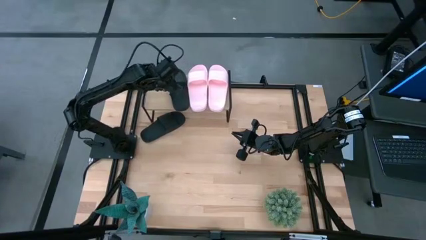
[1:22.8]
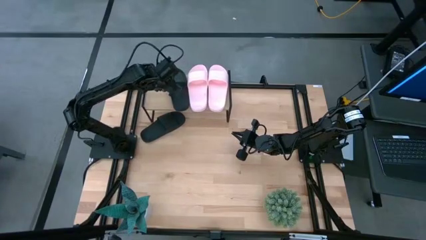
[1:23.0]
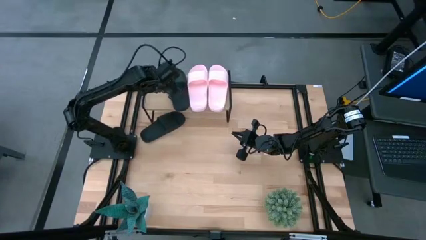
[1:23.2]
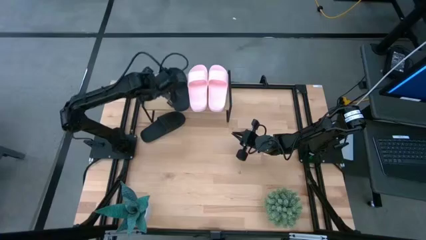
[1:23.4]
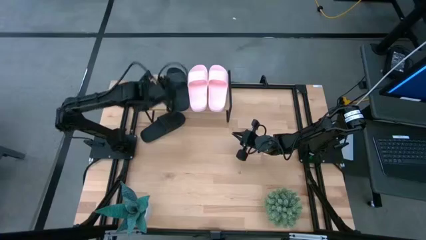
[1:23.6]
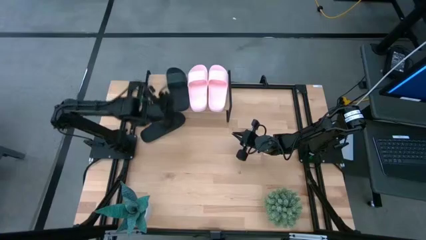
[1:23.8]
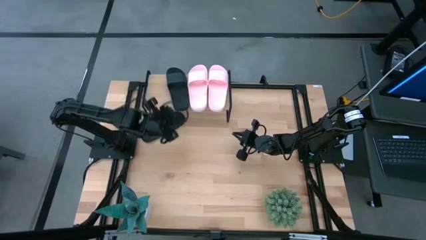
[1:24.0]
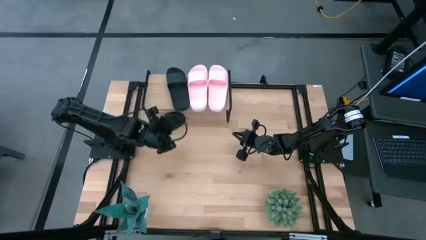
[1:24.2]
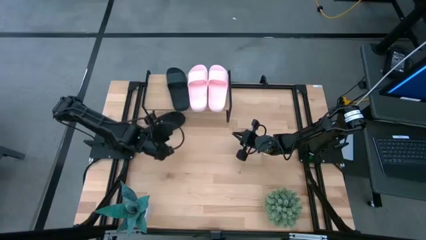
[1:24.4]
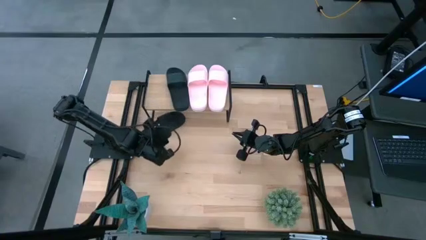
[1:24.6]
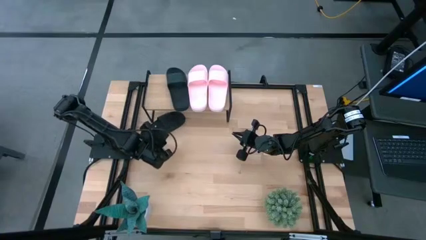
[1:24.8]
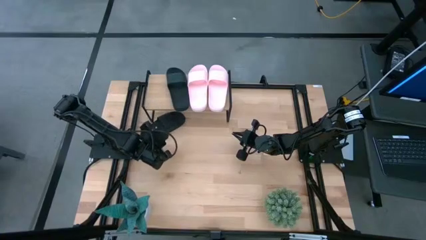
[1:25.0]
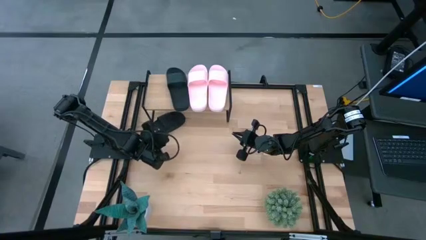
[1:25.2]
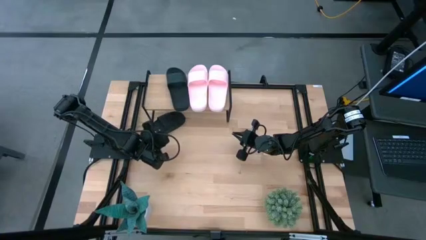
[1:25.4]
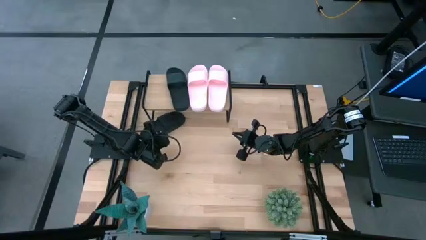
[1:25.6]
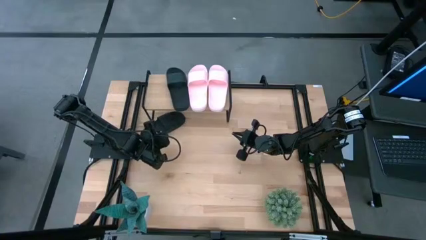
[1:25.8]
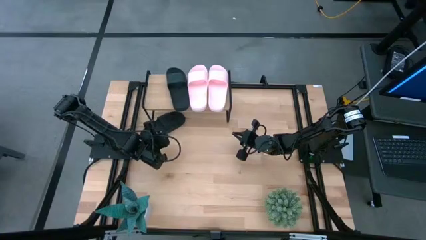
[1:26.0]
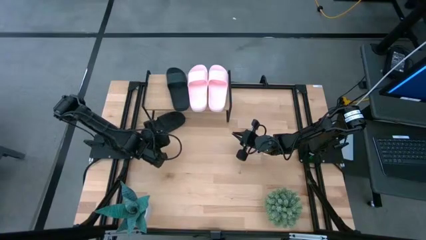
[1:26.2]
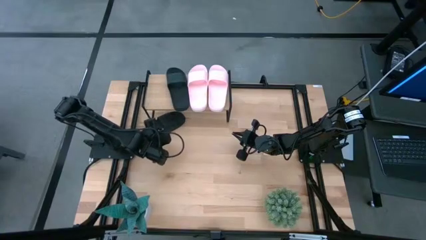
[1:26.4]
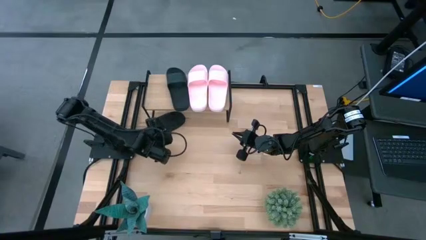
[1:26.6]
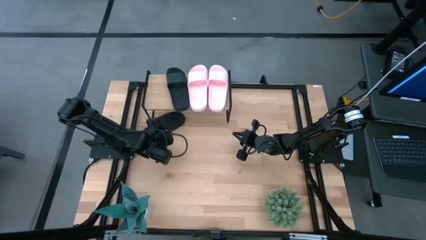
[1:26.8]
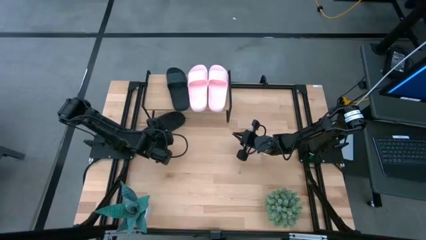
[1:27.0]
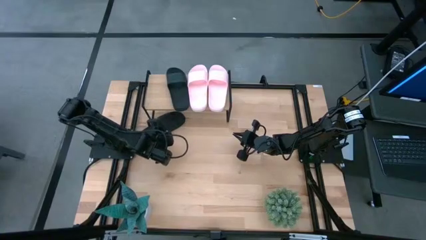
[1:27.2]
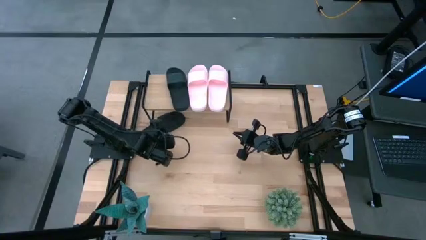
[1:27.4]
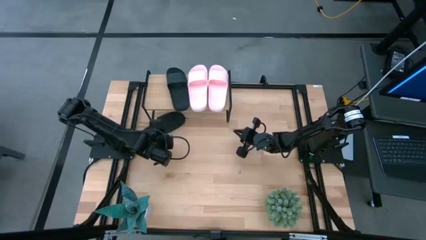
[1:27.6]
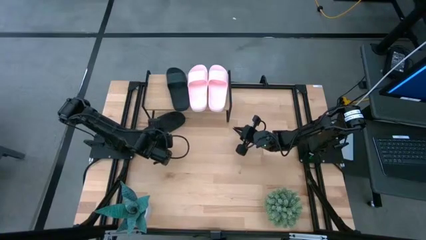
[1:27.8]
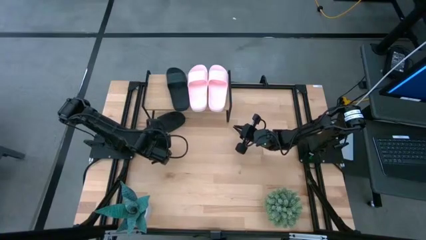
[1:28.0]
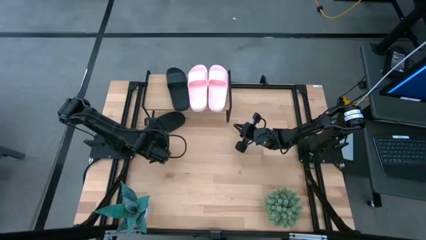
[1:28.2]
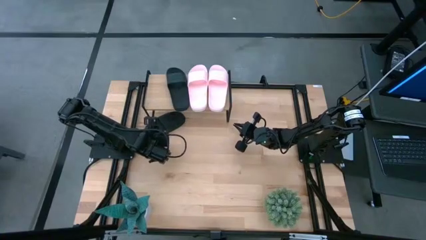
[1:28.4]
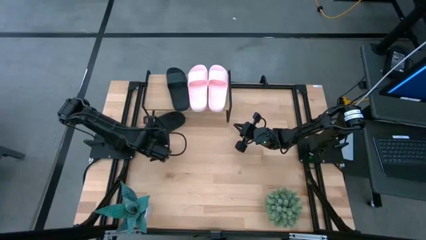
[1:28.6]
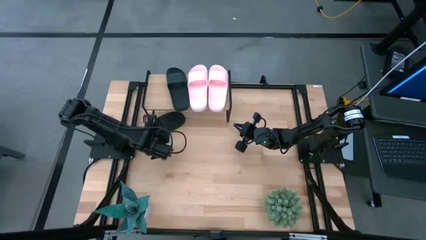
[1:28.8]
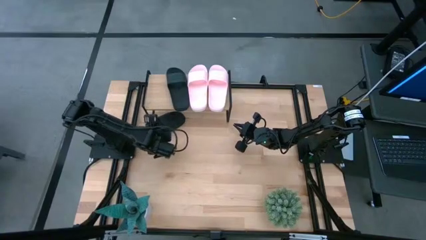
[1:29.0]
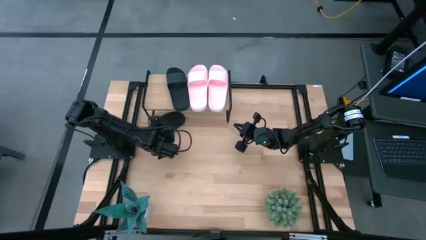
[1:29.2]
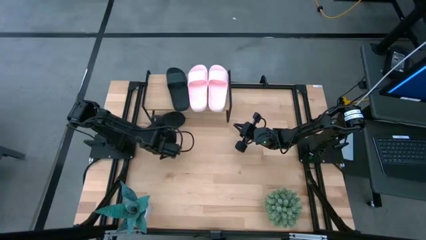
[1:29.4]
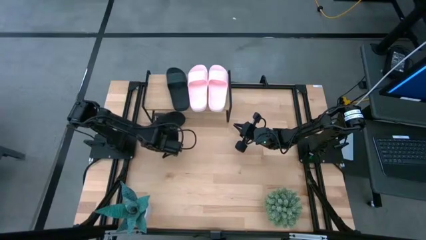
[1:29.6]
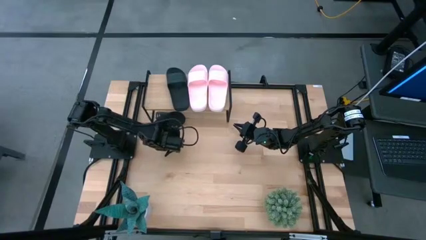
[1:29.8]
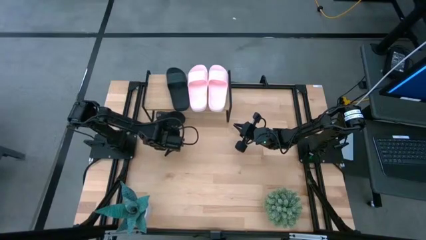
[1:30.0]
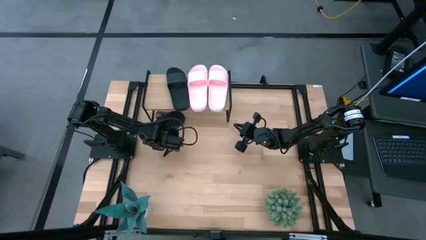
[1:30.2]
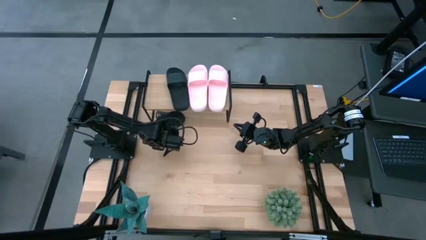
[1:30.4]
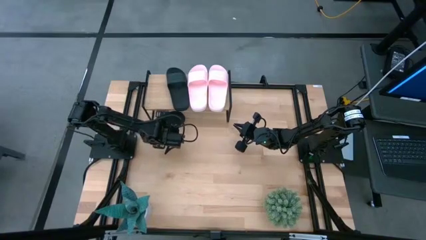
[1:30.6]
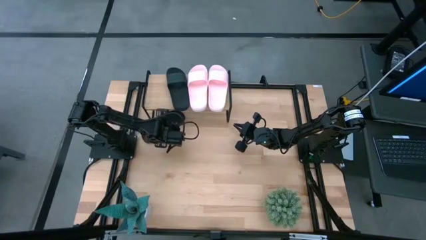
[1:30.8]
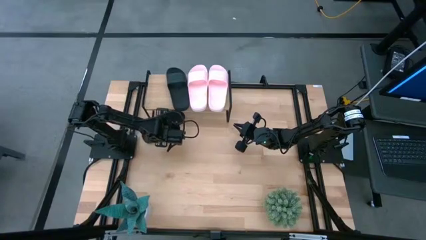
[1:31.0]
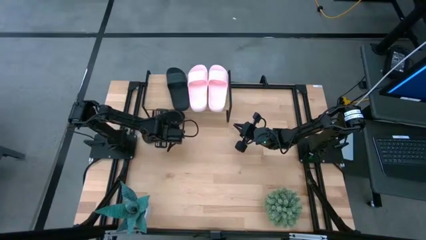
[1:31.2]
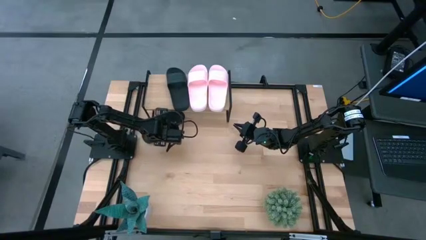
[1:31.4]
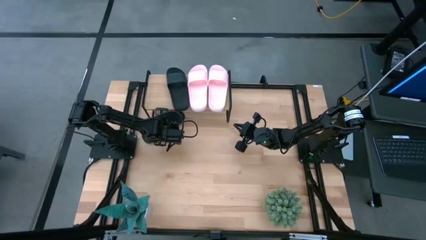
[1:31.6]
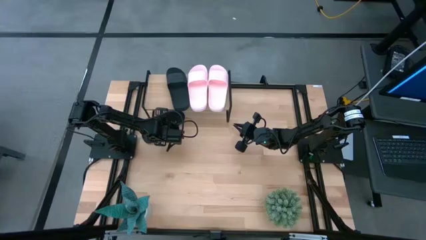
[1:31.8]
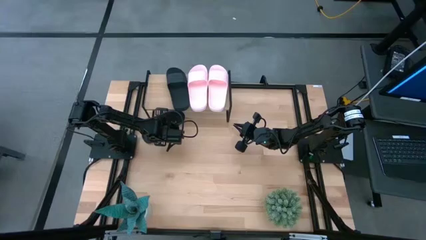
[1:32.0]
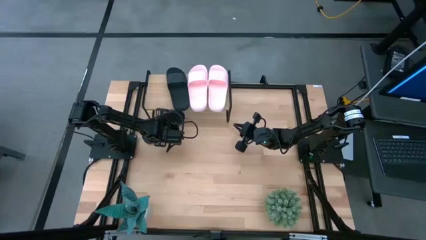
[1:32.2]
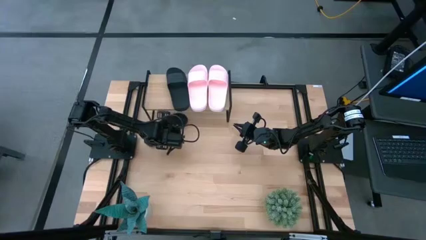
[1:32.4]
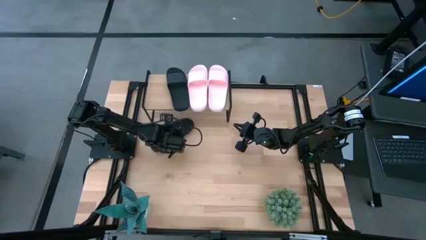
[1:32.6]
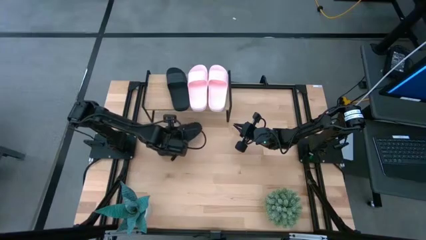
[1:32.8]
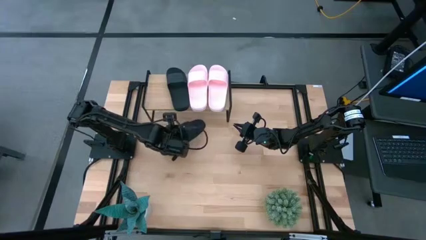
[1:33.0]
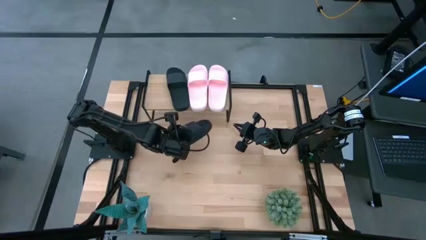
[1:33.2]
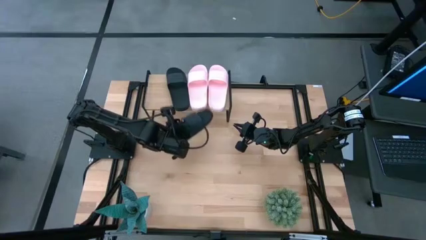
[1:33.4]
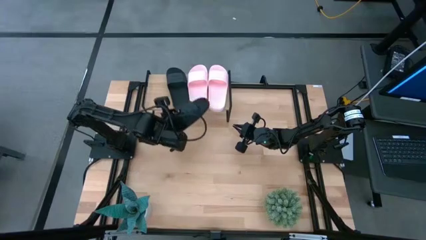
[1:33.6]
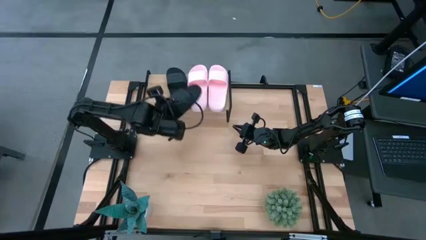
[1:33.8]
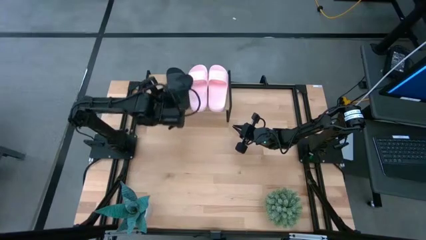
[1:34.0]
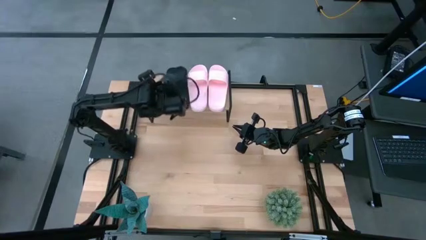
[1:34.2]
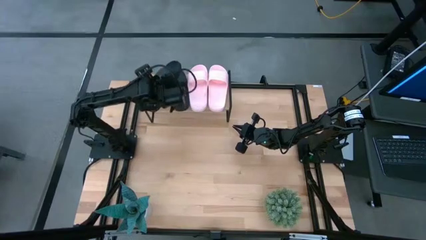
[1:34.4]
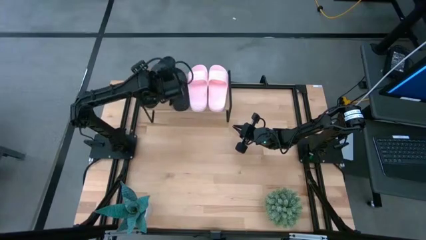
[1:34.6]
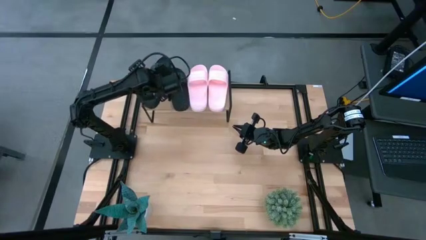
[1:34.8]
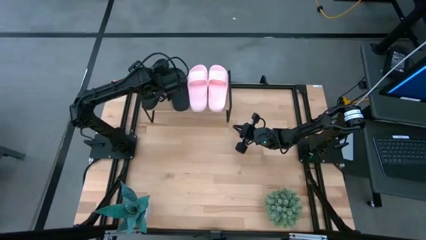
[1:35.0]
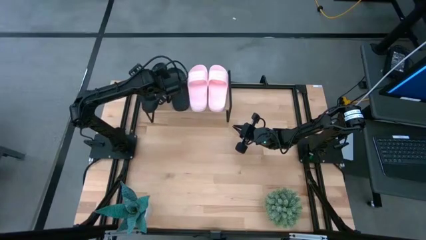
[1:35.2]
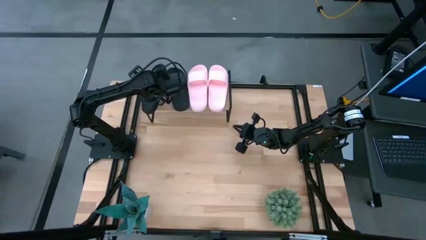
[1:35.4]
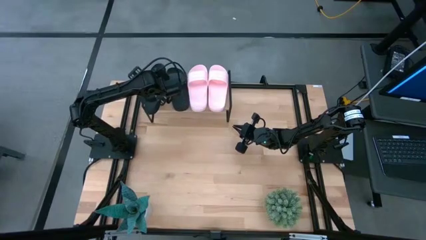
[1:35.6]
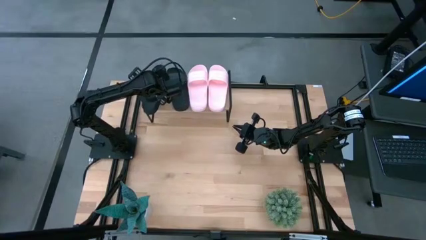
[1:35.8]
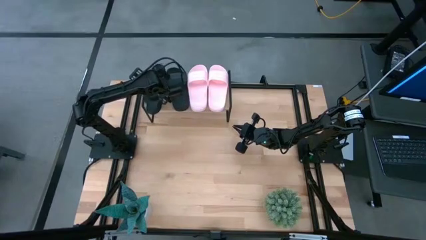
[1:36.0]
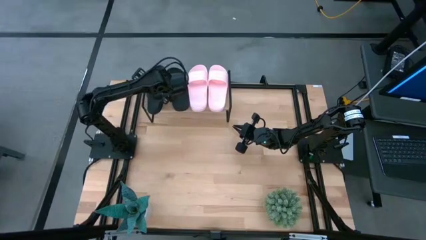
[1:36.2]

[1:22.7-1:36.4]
Task: Pick and place slides into the shelf
Put the black slide on the shelf
